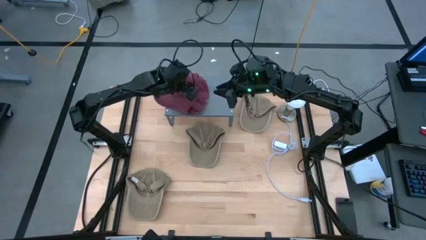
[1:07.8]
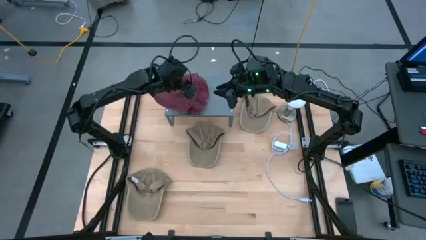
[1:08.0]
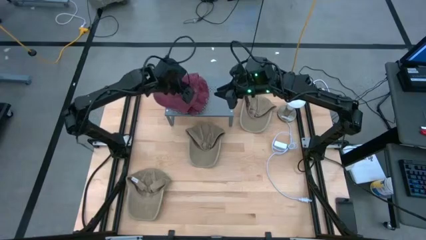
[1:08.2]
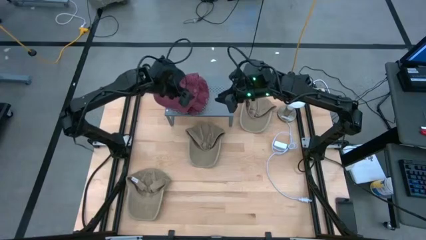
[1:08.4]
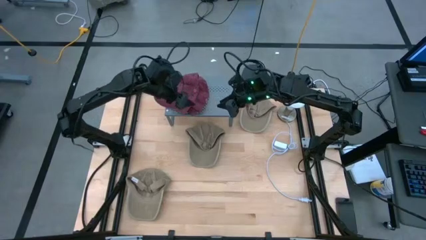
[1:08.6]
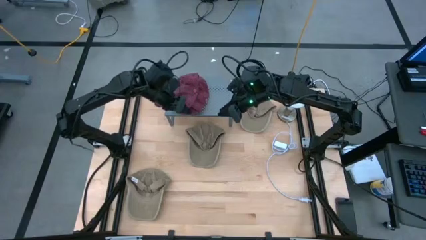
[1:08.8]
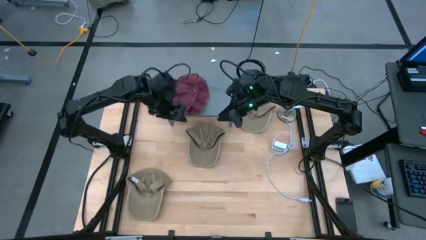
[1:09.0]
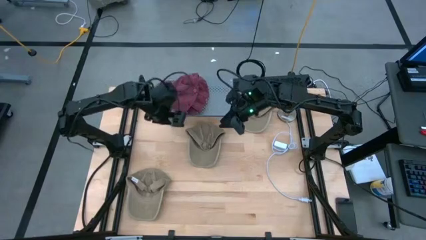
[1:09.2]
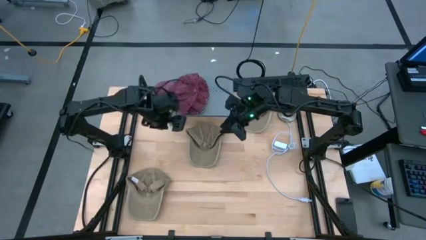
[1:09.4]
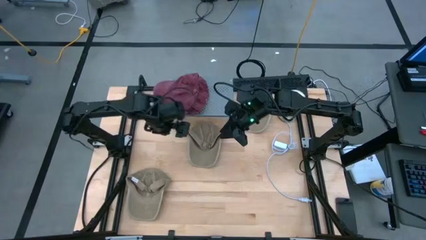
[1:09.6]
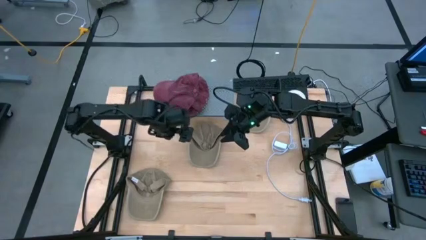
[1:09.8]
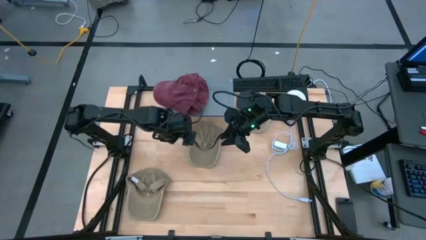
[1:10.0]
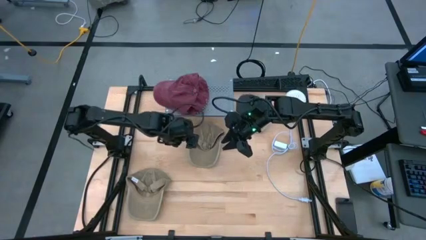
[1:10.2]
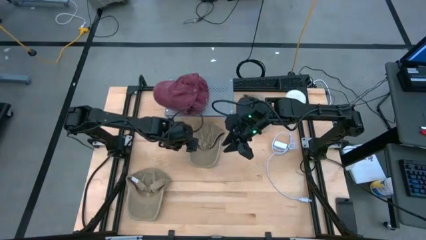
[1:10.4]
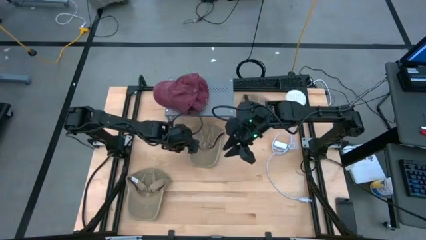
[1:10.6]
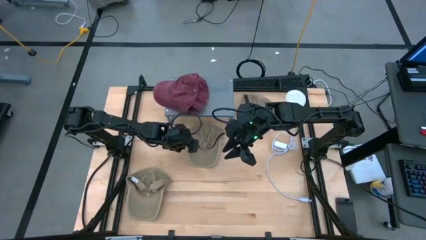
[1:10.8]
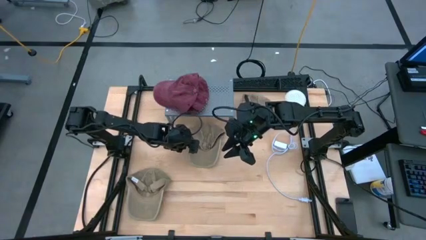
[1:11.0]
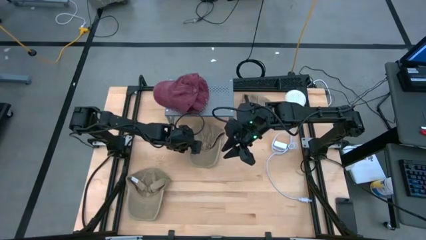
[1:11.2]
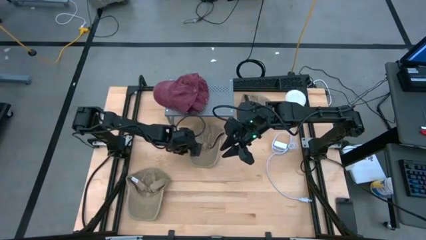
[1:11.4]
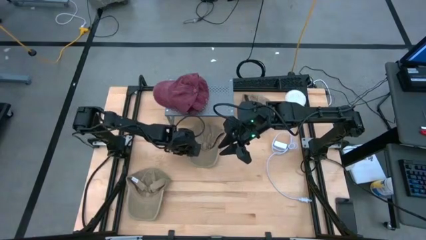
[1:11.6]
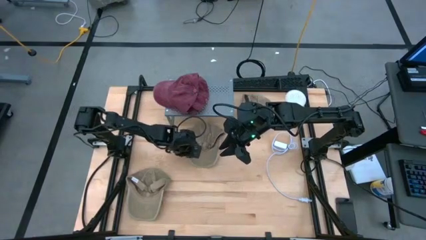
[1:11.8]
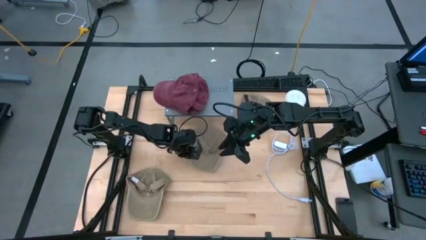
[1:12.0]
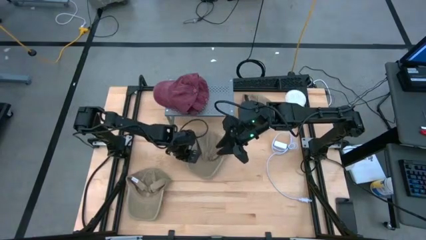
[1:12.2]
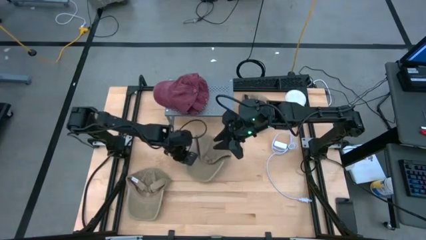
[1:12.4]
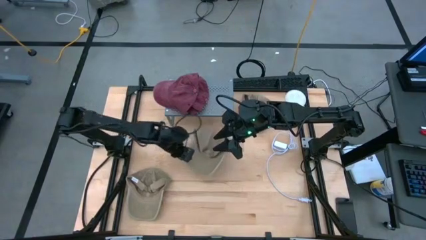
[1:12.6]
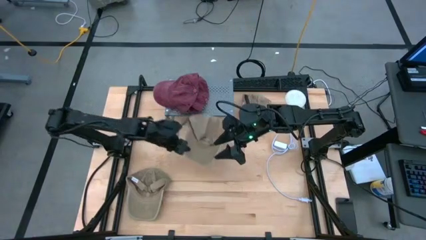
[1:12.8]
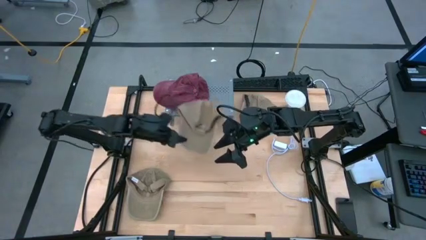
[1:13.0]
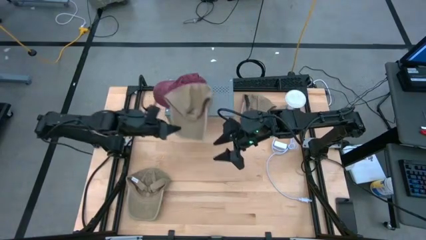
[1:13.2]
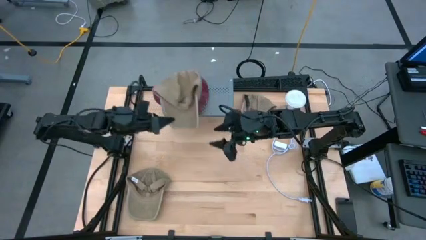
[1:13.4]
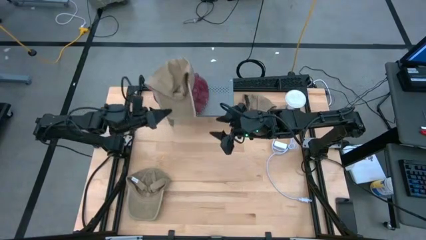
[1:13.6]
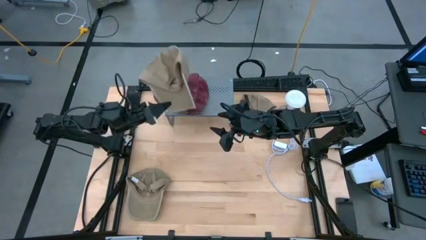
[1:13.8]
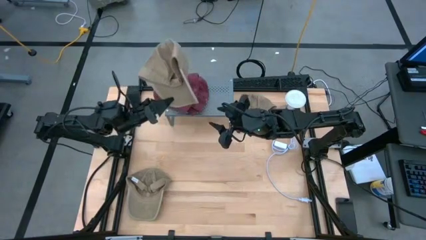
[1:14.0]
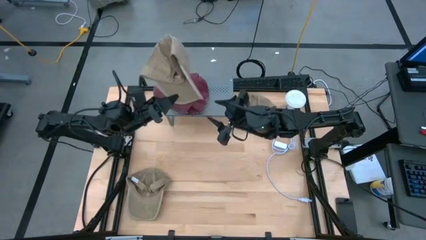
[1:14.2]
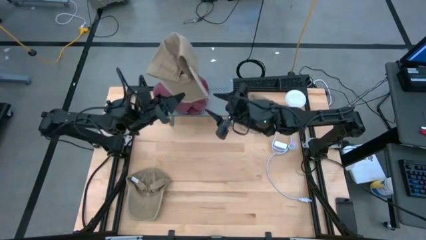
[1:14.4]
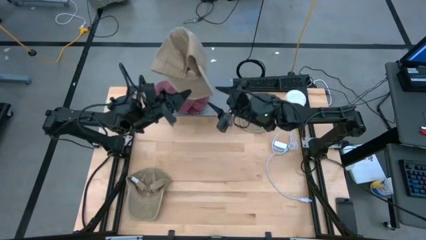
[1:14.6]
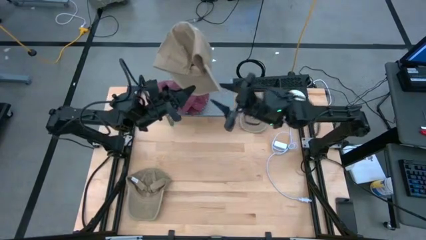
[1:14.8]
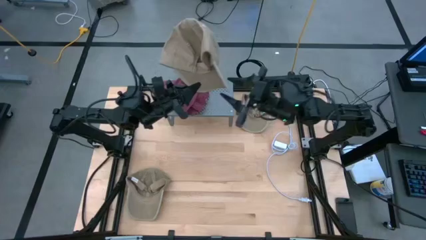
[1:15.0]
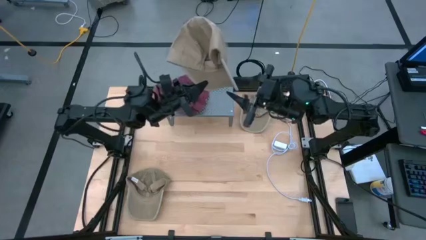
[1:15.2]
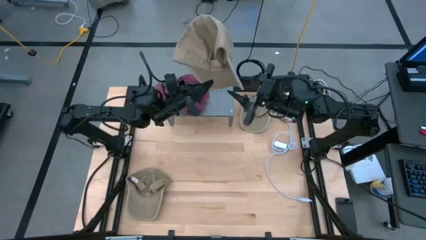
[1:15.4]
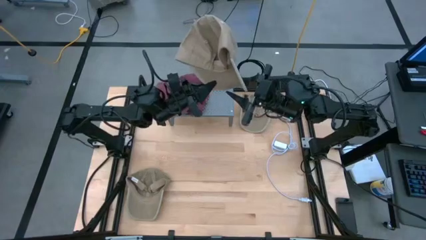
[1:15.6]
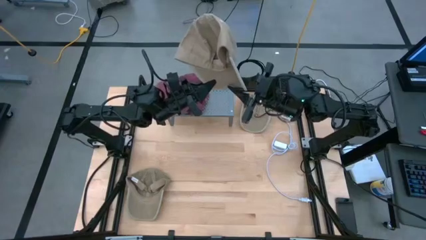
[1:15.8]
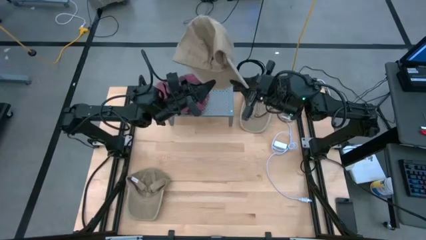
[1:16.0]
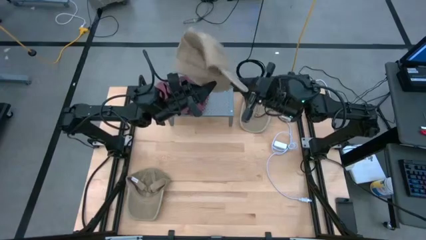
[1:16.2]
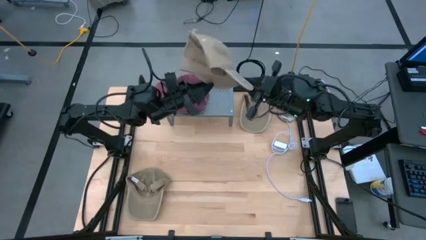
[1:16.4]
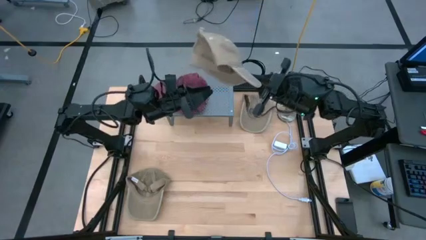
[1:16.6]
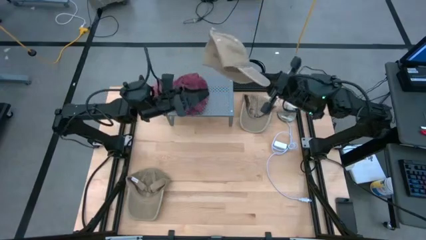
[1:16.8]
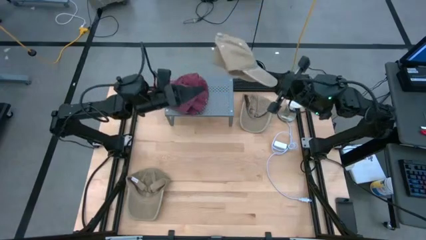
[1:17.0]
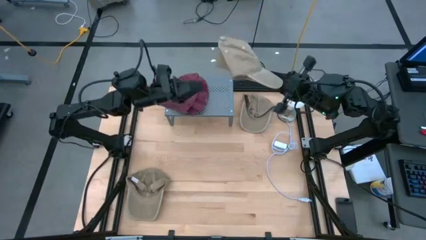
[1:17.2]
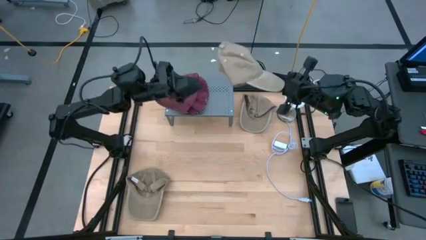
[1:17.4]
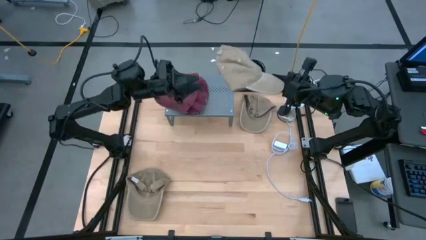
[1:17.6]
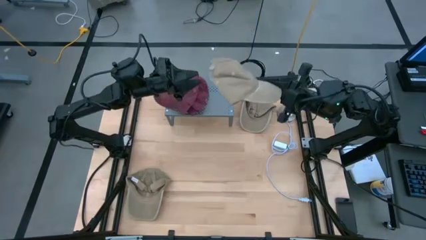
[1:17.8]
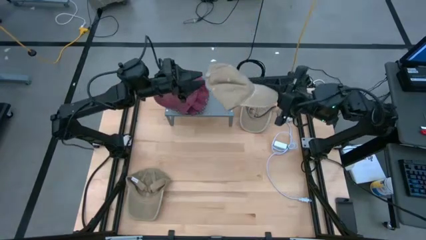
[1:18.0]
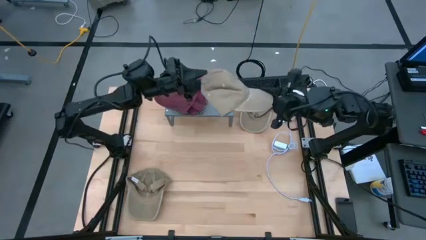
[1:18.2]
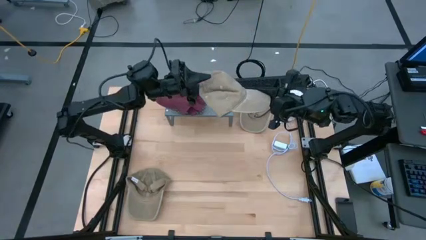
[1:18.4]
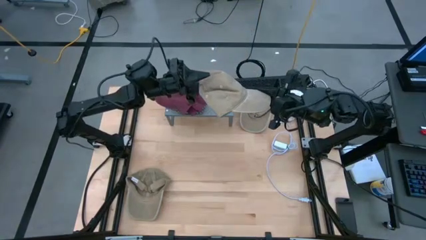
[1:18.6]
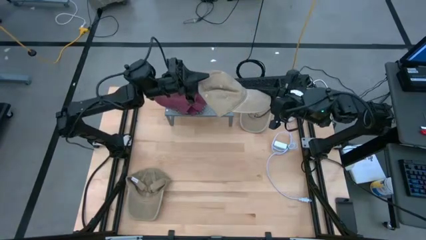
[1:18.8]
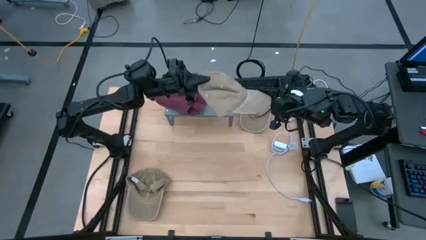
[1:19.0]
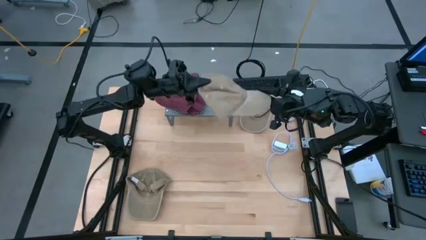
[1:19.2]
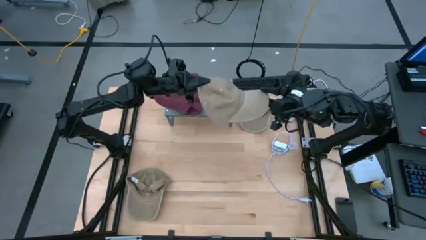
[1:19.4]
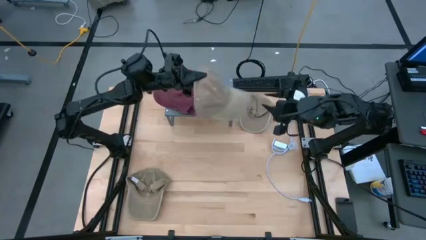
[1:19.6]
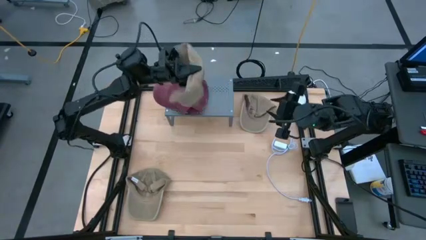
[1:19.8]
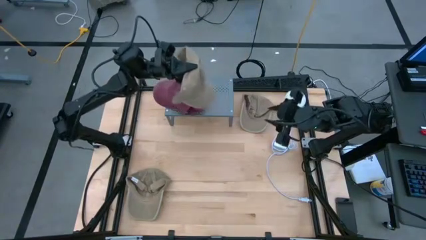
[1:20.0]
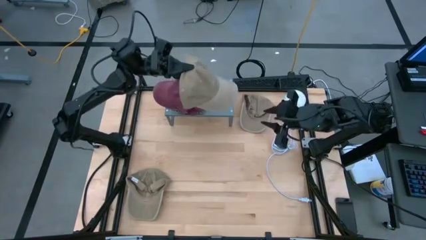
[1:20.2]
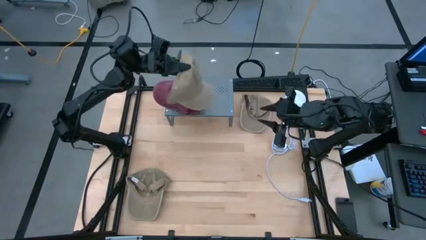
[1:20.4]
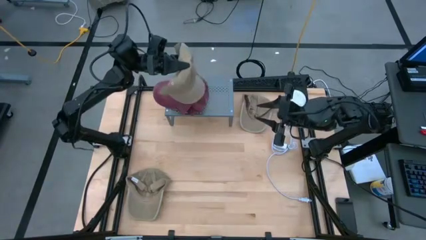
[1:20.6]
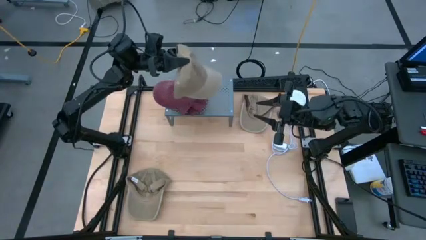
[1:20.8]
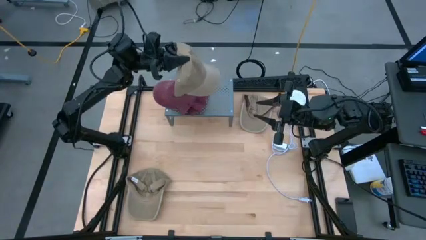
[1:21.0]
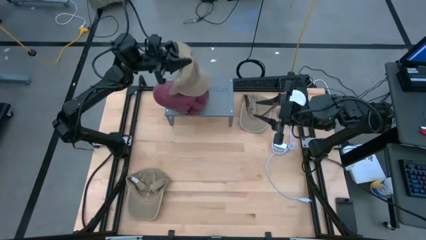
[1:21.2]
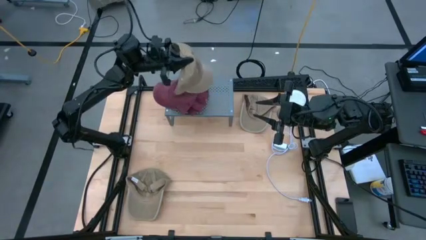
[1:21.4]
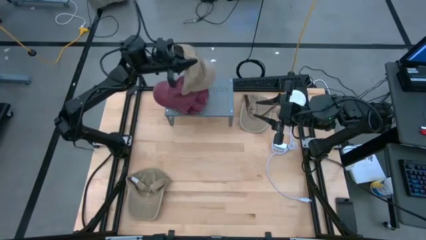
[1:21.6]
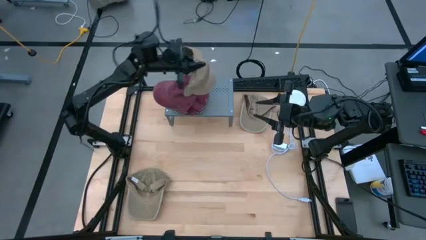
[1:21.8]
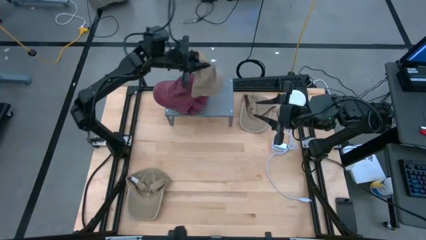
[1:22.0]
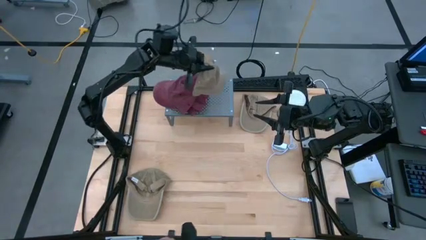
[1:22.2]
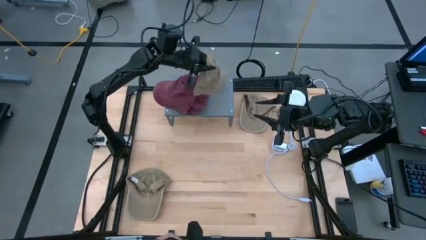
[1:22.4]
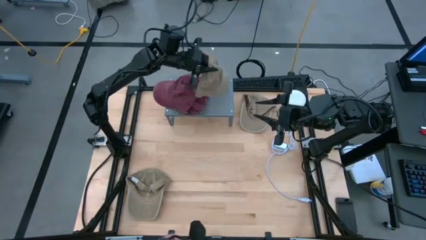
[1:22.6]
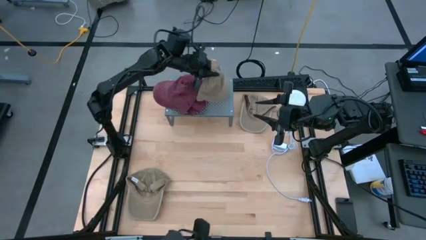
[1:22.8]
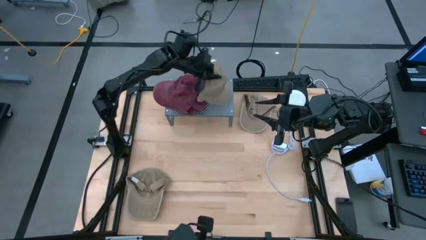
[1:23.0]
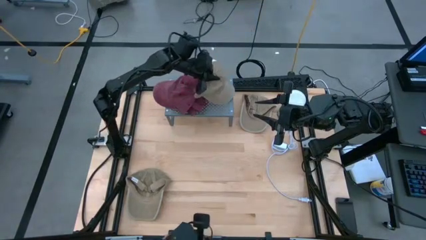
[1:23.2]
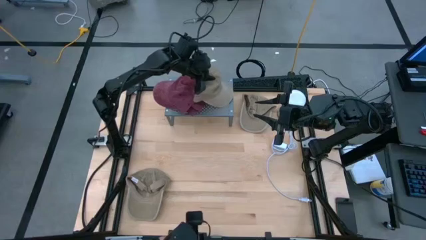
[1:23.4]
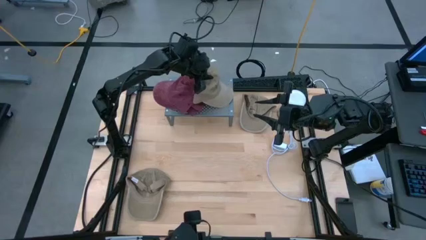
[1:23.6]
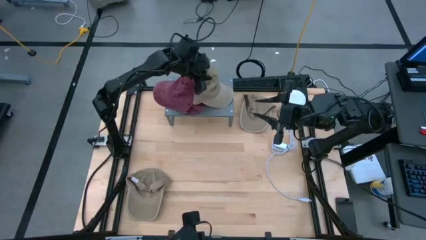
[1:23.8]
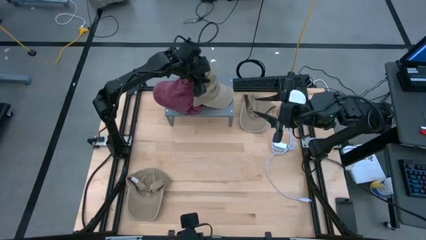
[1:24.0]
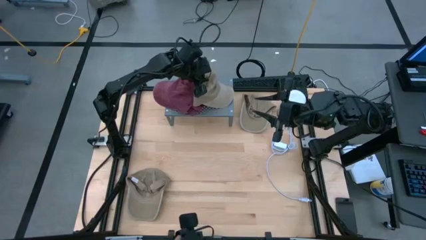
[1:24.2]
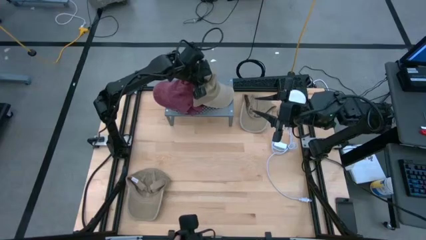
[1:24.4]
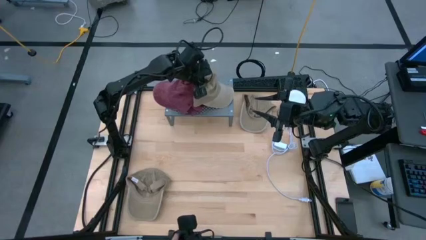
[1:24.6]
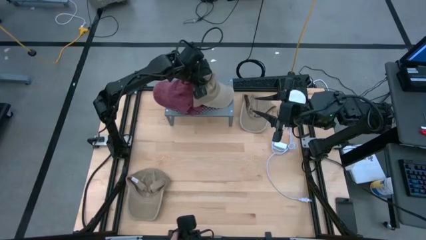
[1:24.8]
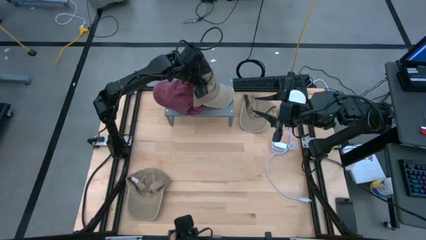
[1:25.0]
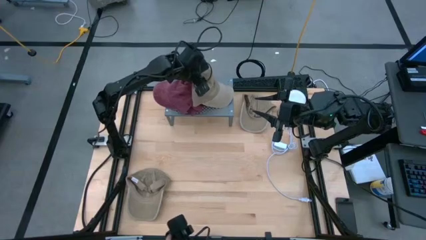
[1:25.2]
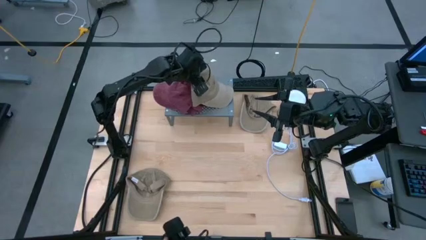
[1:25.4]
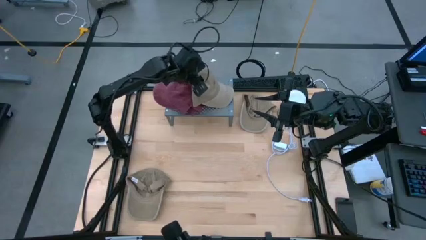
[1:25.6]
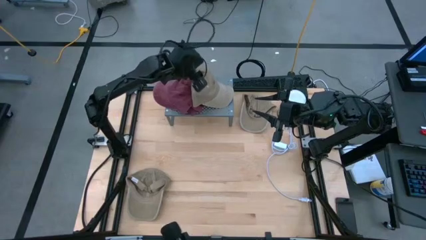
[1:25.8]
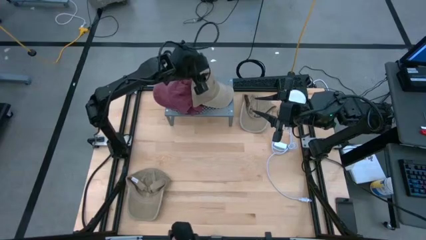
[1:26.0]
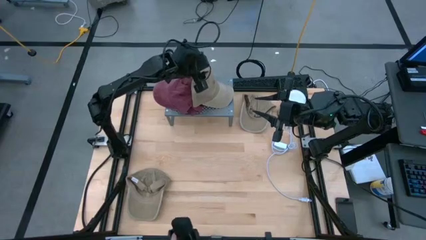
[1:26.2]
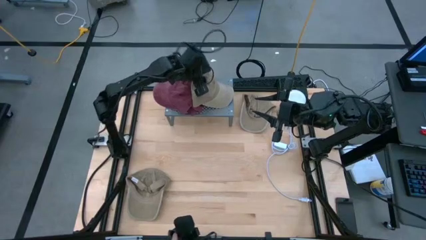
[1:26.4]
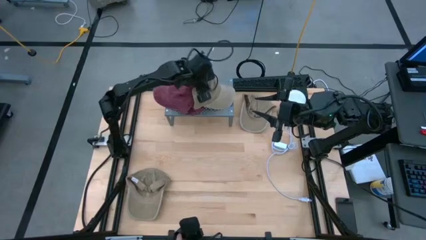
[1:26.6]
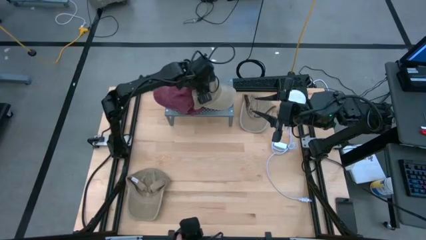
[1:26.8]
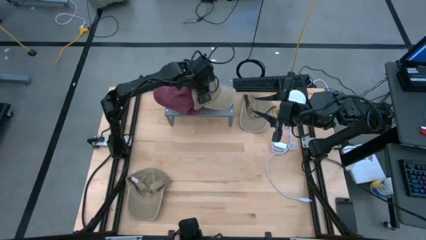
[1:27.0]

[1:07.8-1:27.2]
Task: Pick & Place hat
Put the light brown cap on the shelf
